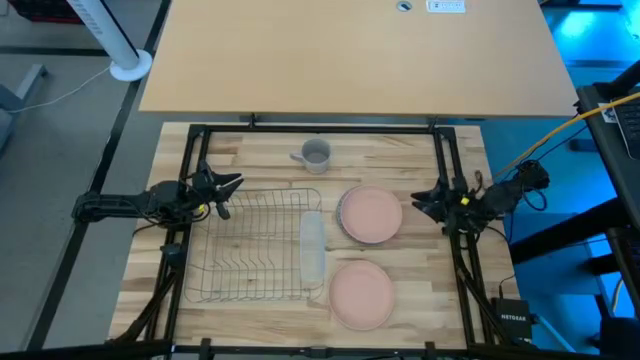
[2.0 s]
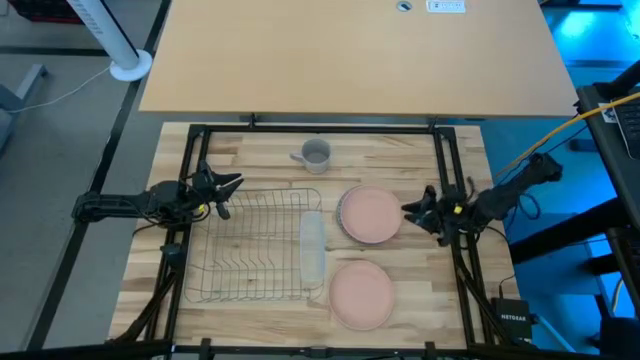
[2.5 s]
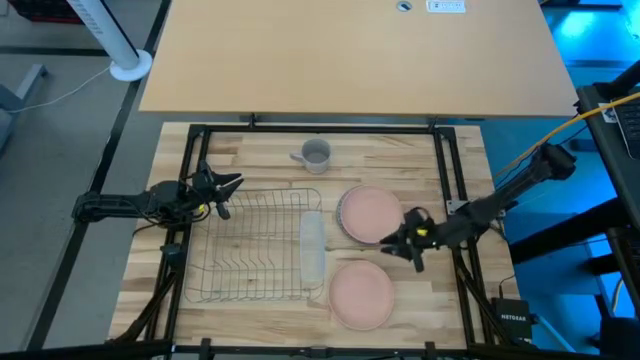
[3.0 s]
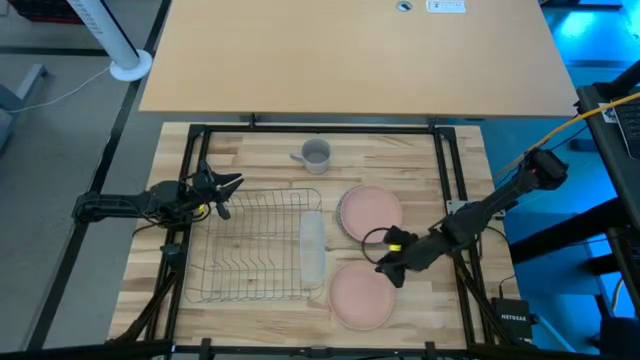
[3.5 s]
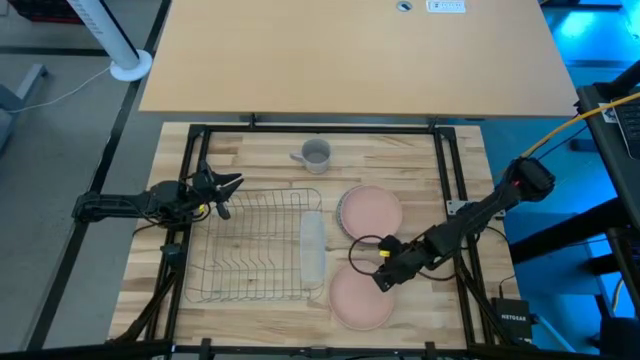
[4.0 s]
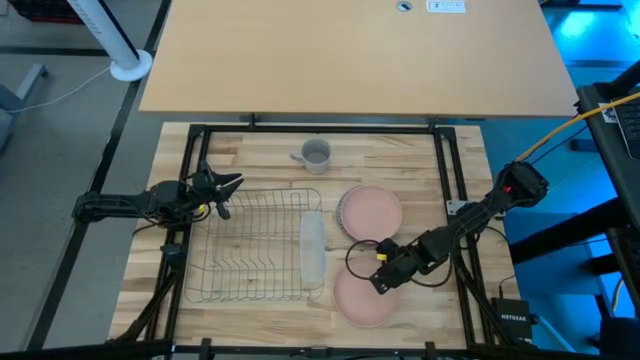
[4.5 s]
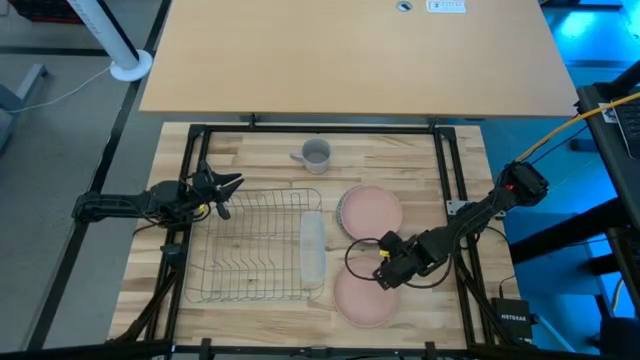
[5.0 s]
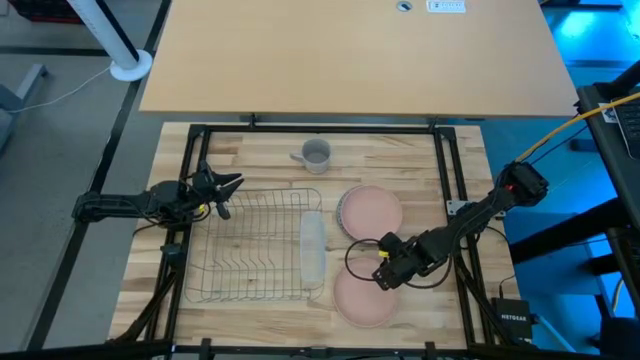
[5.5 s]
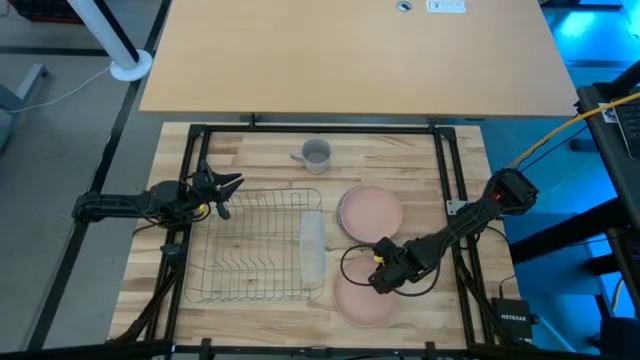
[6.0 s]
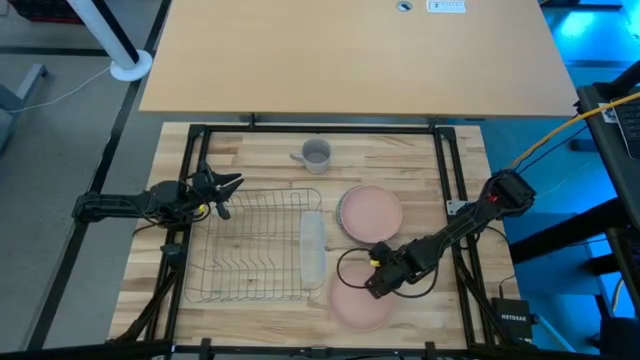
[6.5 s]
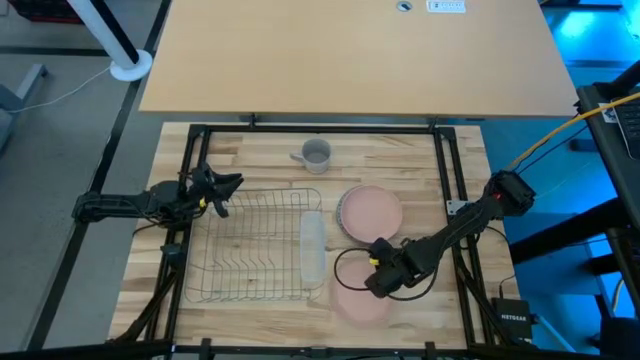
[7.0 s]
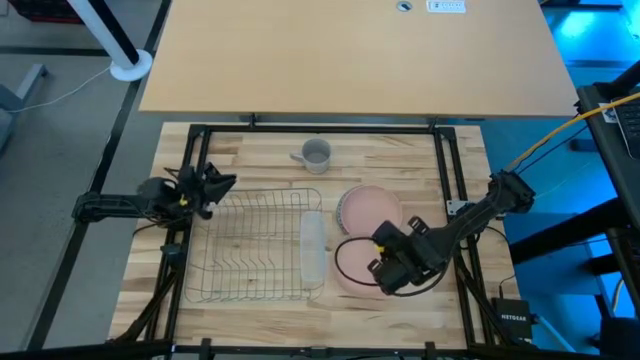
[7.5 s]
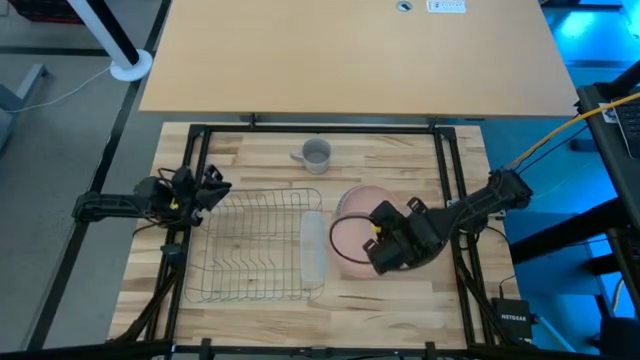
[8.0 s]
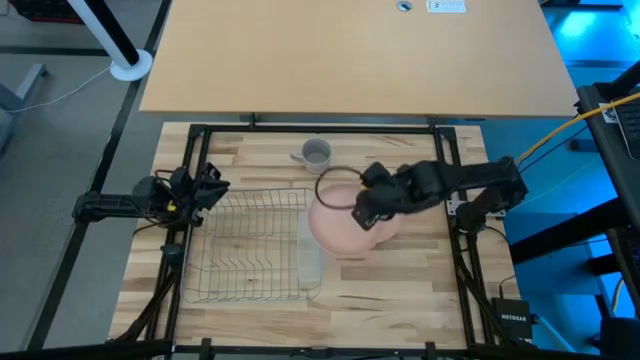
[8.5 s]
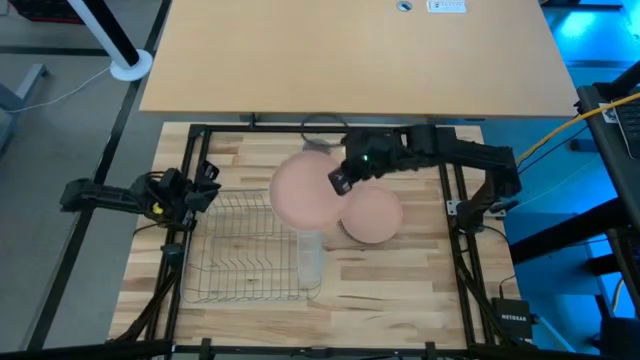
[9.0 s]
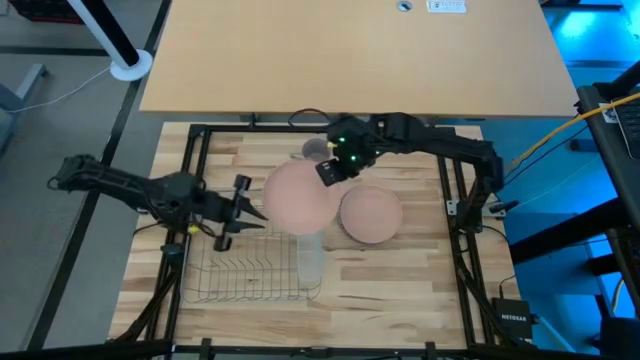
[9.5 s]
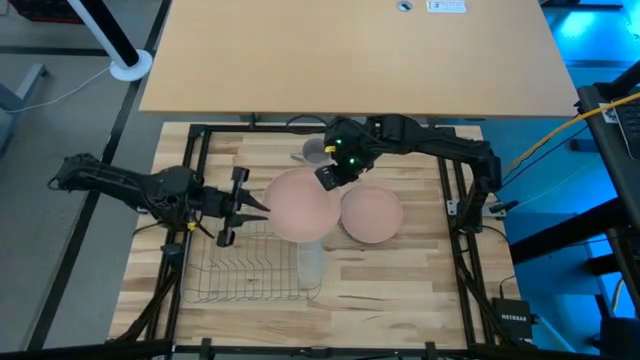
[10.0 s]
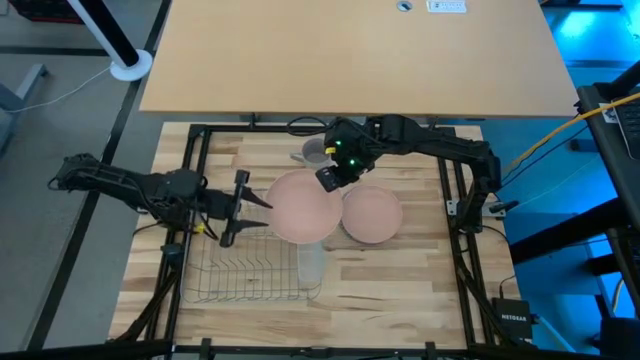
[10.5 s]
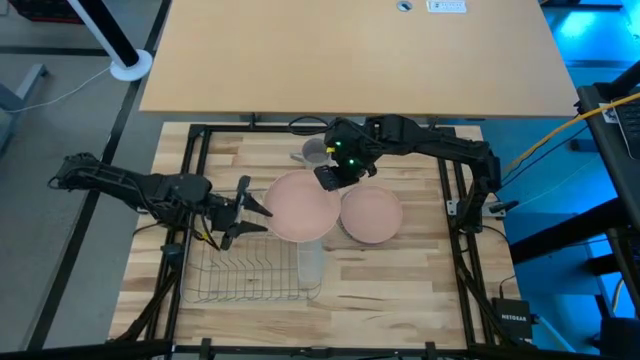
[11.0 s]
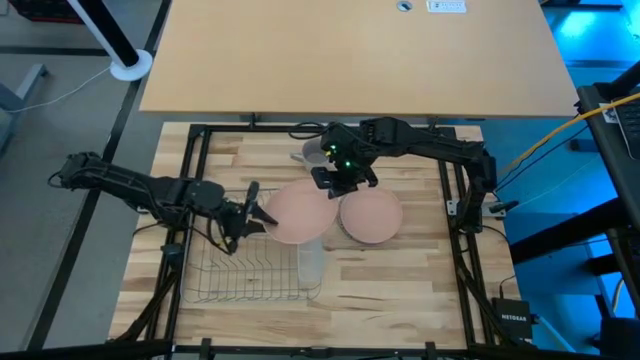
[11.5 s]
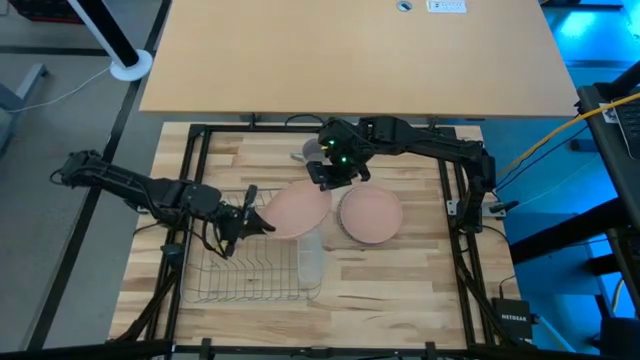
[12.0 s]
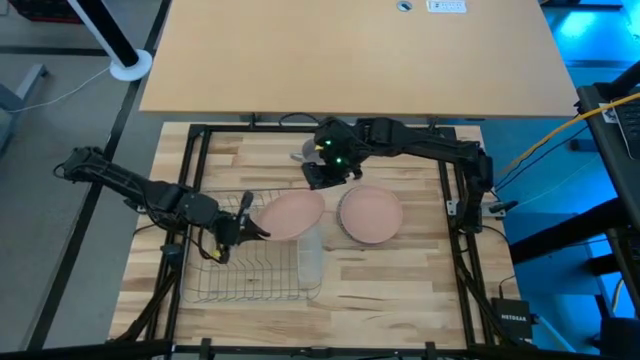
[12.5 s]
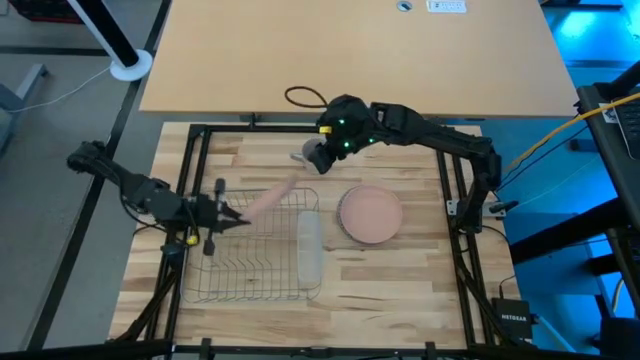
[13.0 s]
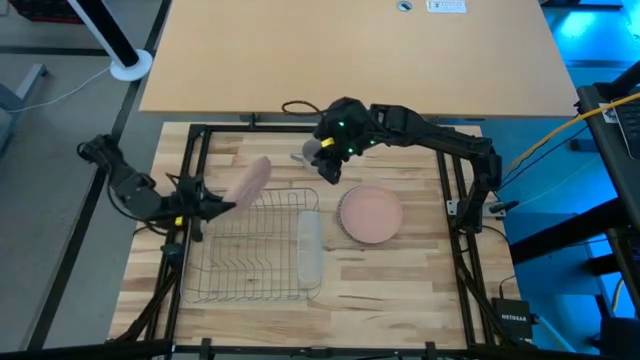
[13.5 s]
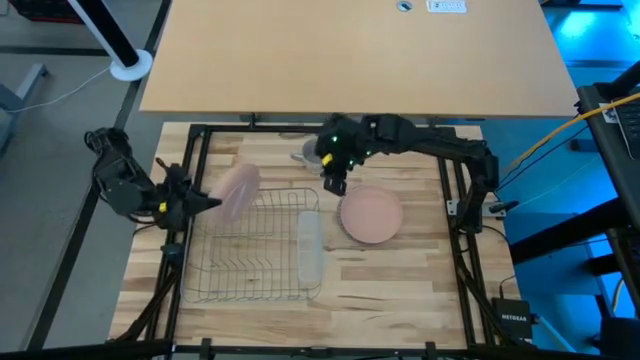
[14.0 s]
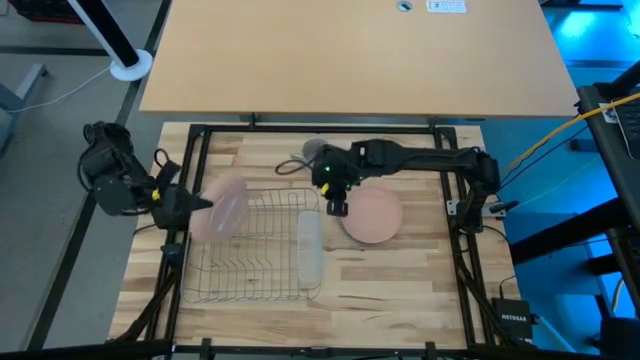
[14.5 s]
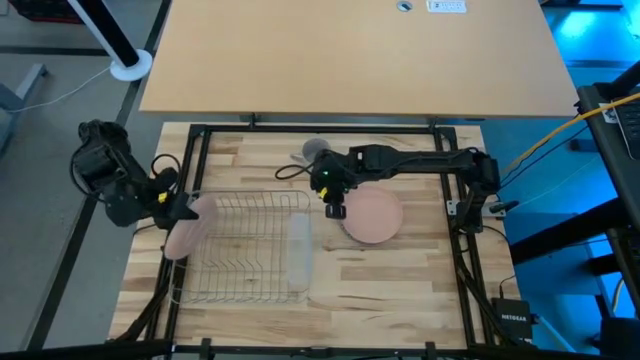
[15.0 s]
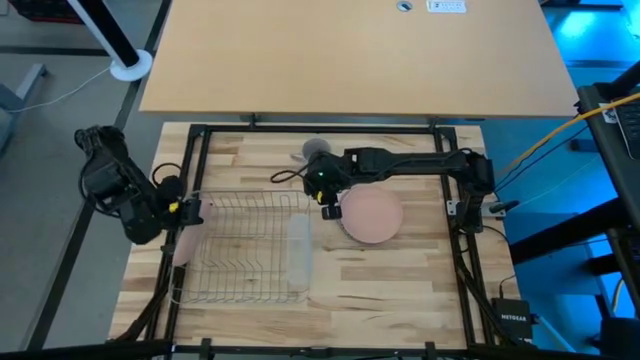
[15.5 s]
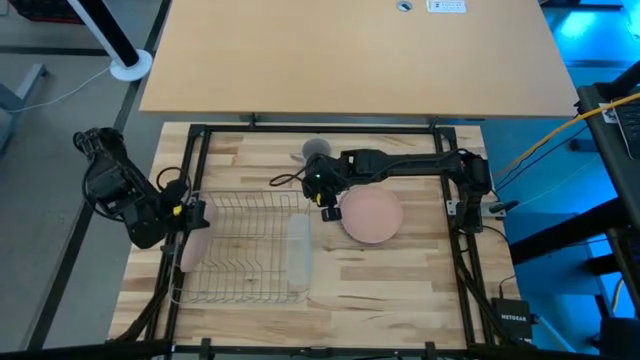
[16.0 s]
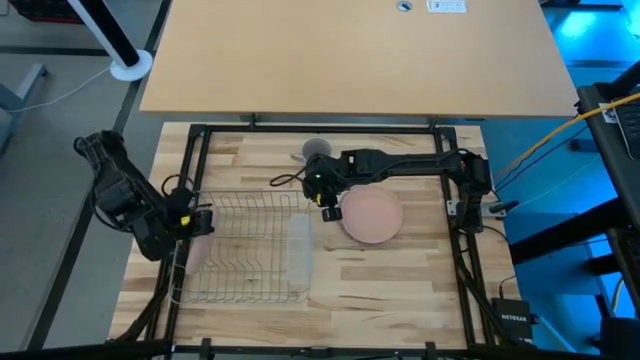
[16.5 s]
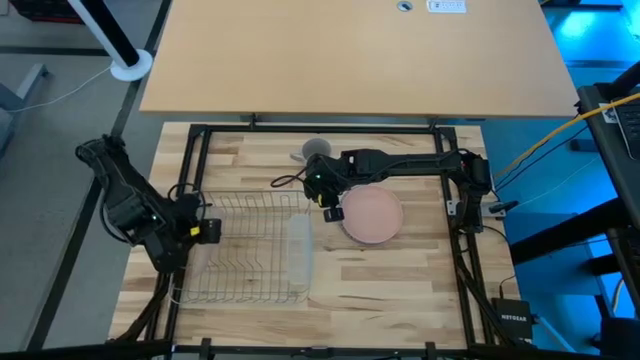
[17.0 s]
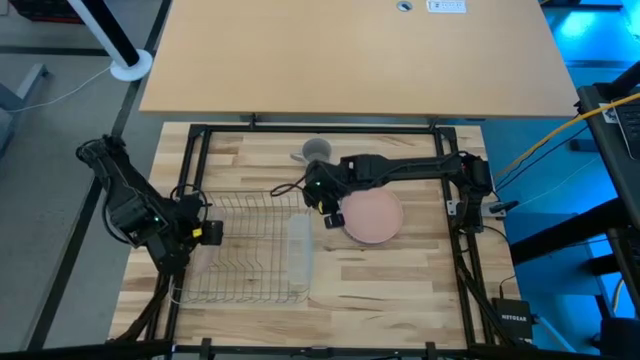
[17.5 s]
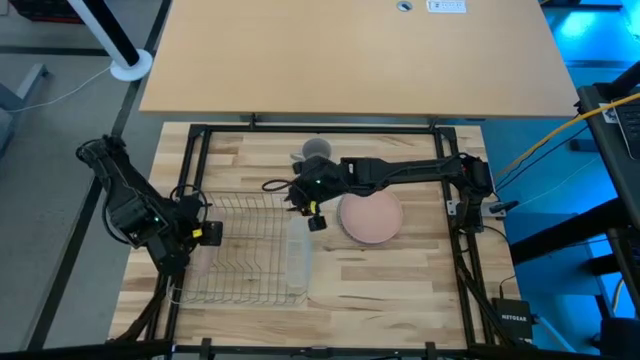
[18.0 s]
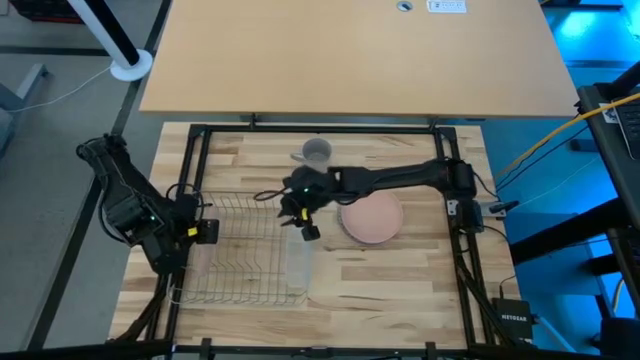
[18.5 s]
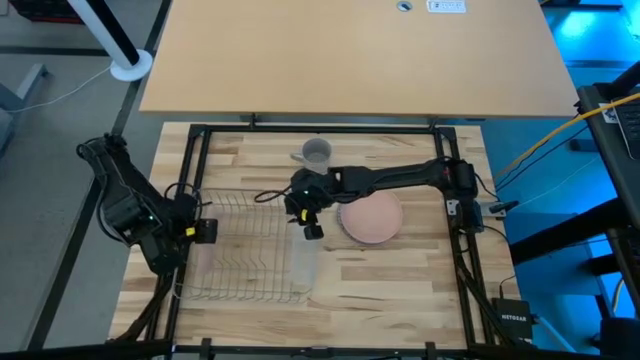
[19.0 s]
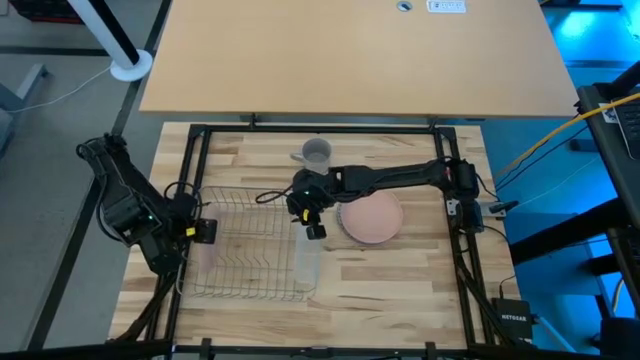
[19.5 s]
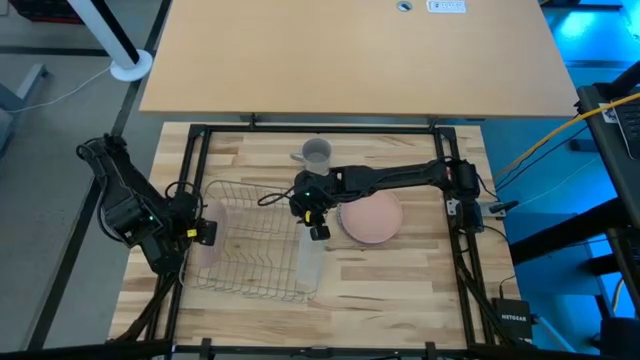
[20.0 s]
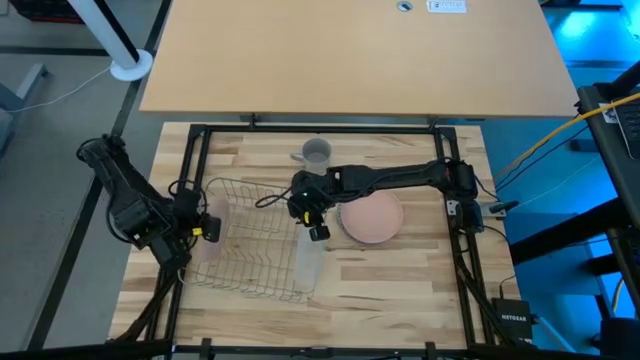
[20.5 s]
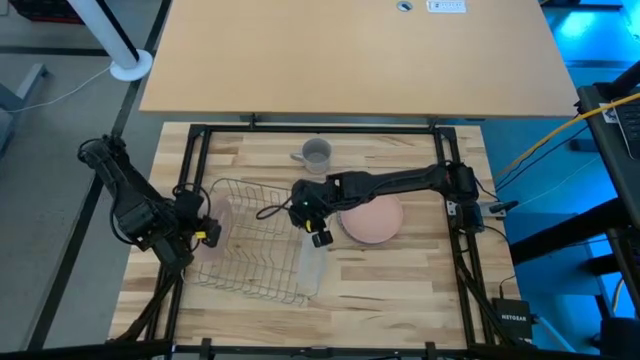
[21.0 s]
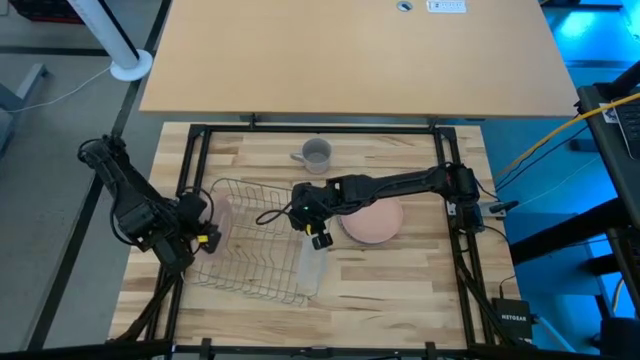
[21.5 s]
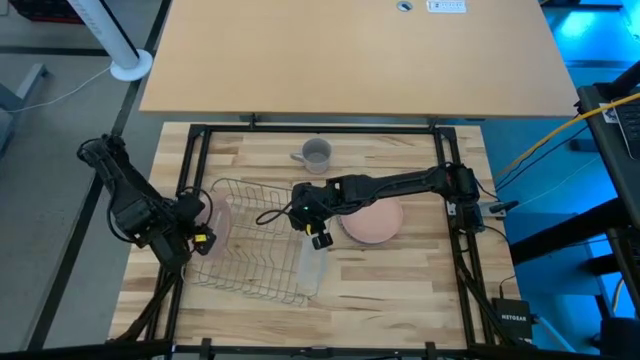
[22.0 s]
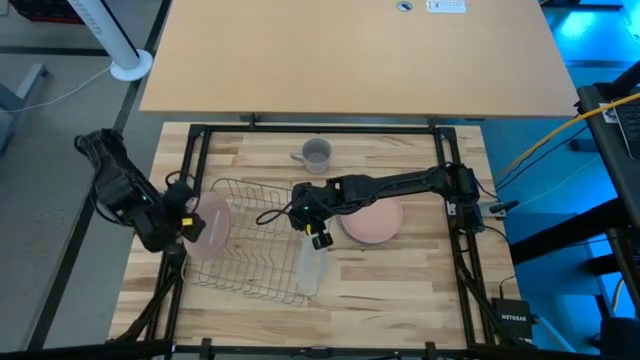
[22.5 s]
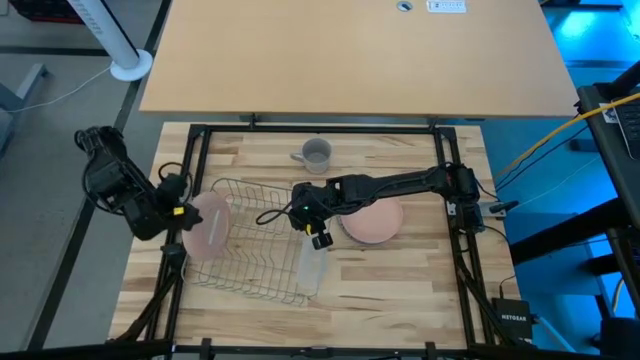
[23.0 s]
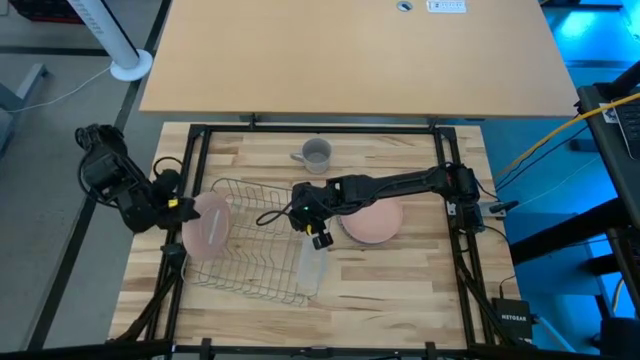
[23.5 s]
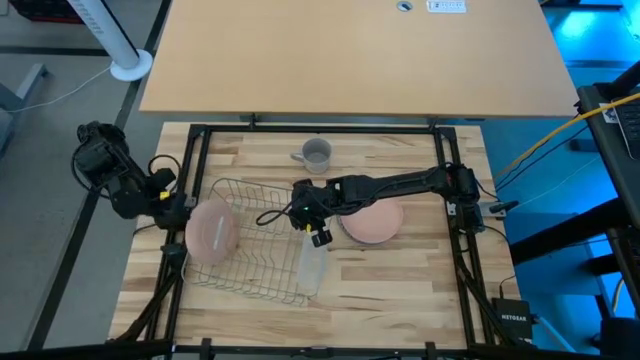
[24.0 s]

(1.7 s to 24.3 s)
Task: Sort dishes
Put the bottom pink plate in the dish rack
